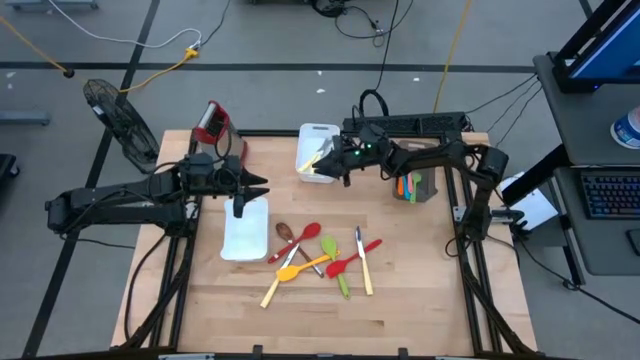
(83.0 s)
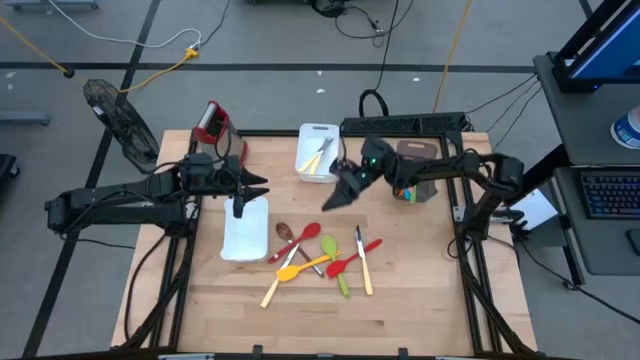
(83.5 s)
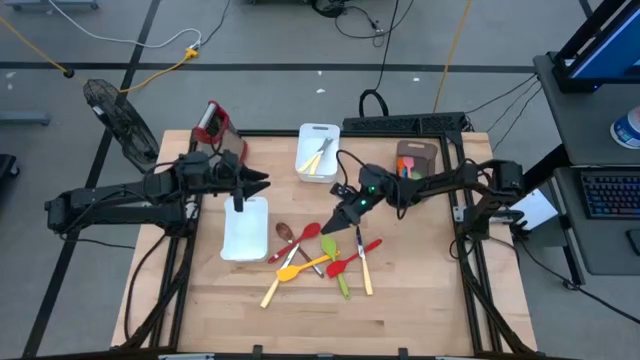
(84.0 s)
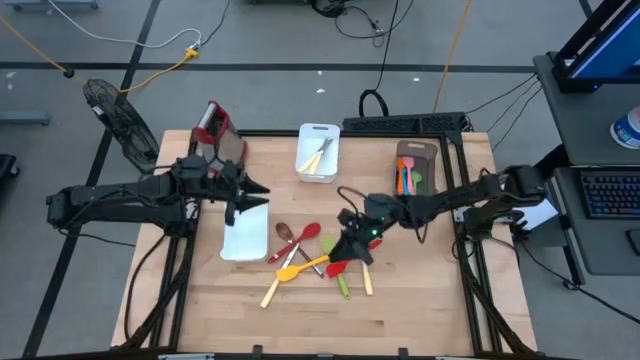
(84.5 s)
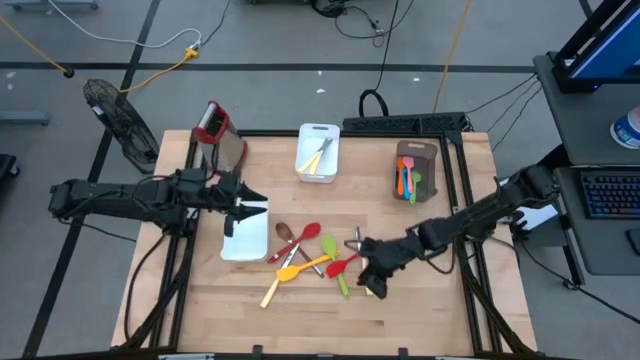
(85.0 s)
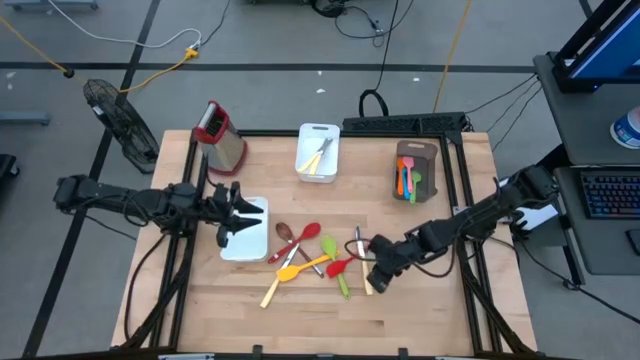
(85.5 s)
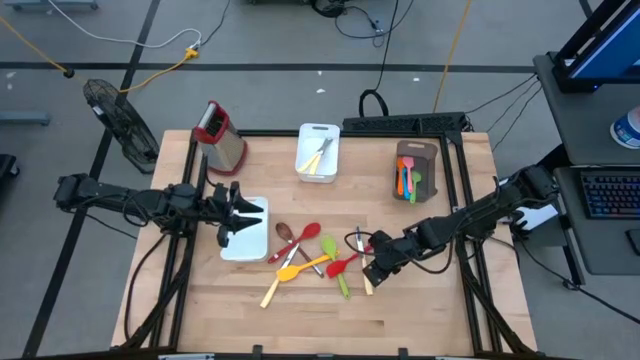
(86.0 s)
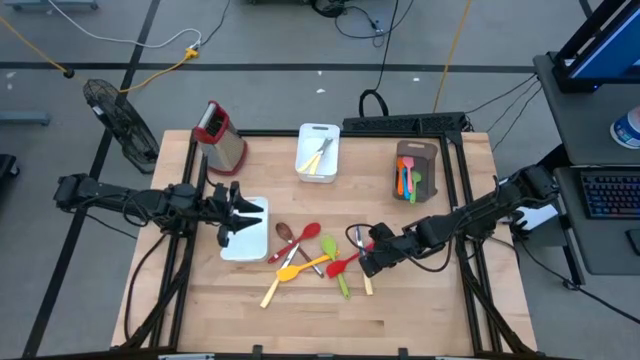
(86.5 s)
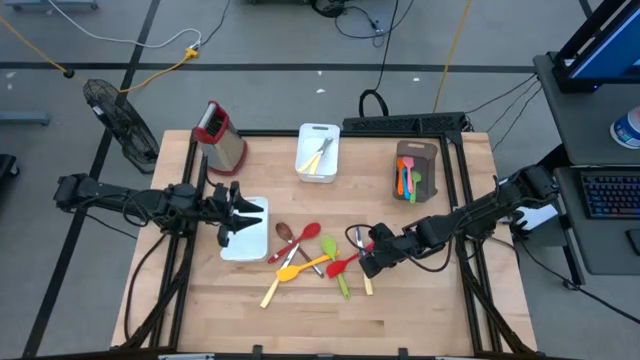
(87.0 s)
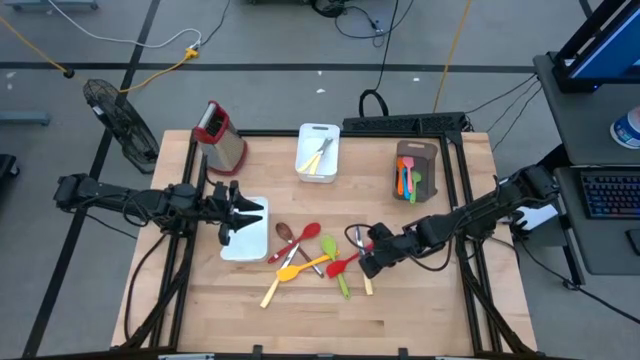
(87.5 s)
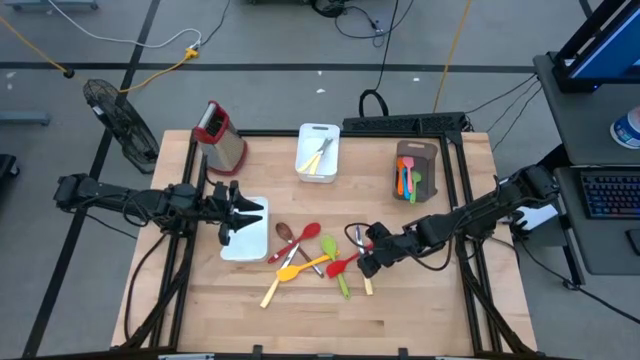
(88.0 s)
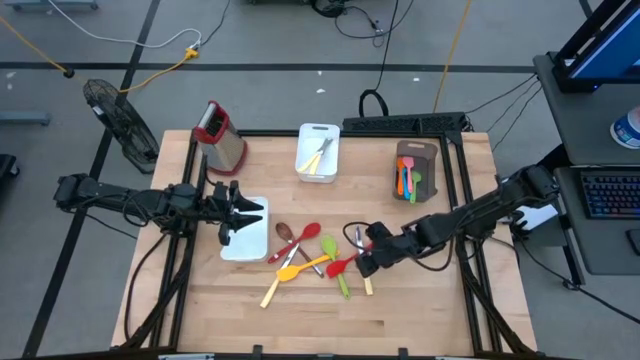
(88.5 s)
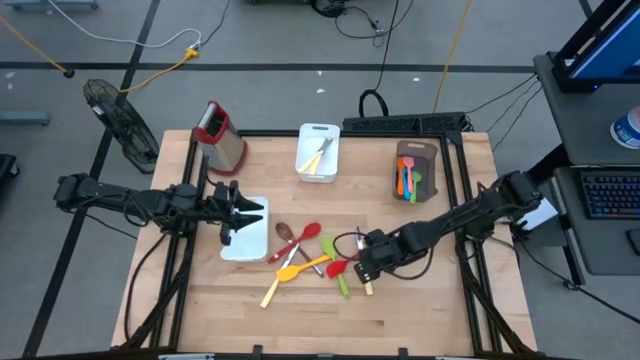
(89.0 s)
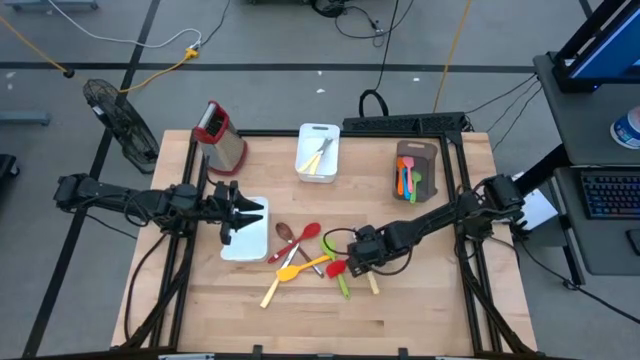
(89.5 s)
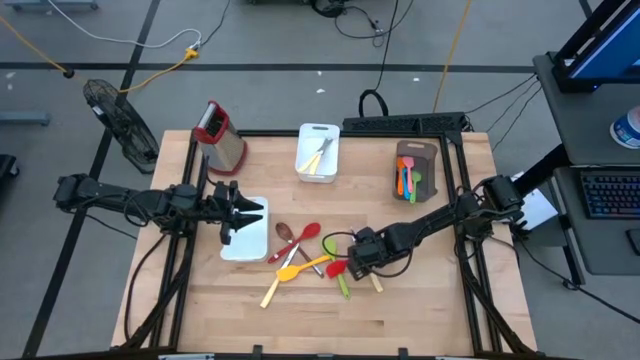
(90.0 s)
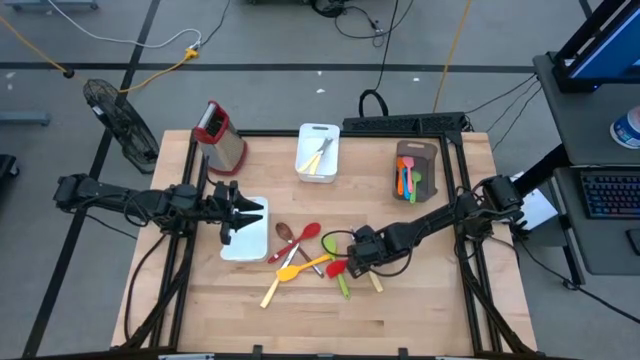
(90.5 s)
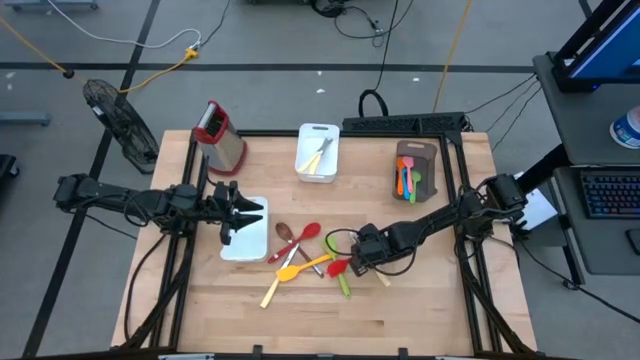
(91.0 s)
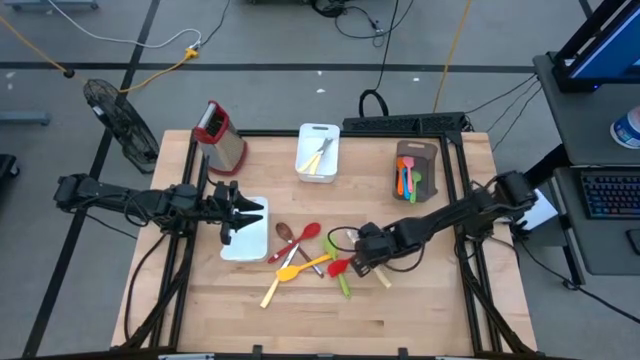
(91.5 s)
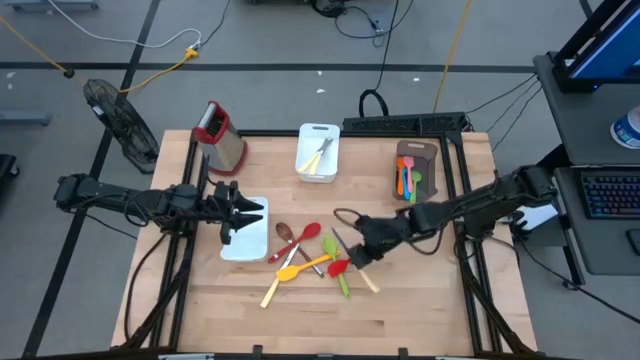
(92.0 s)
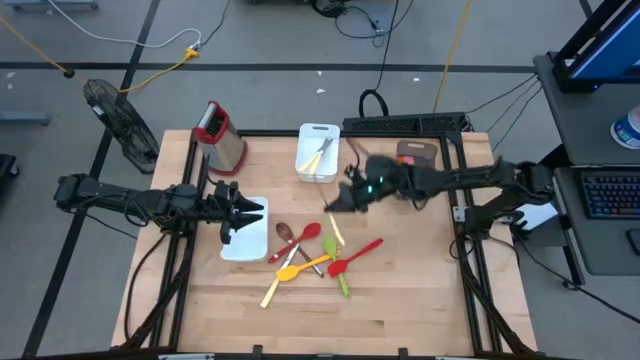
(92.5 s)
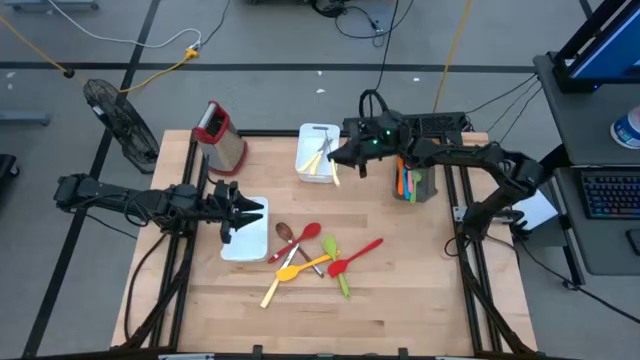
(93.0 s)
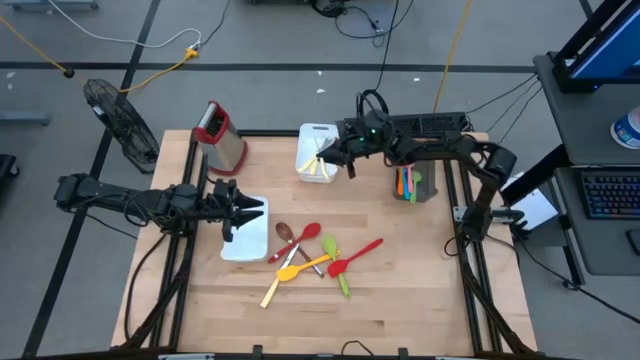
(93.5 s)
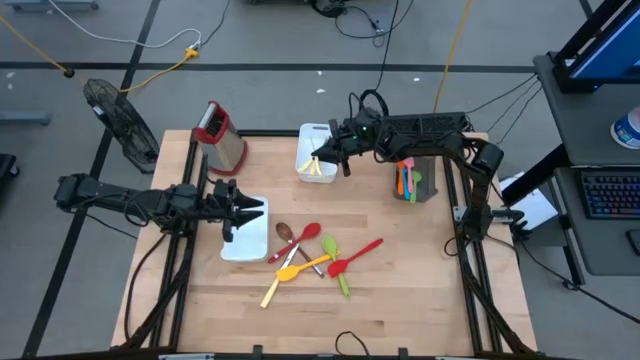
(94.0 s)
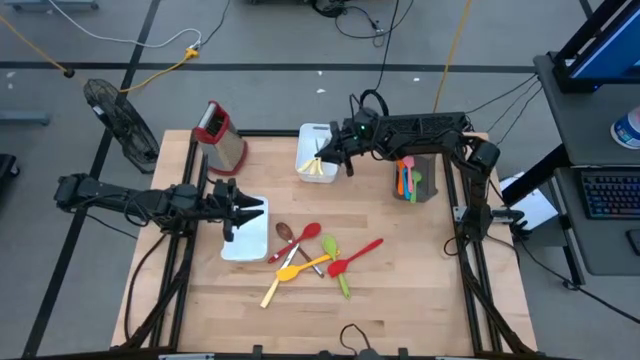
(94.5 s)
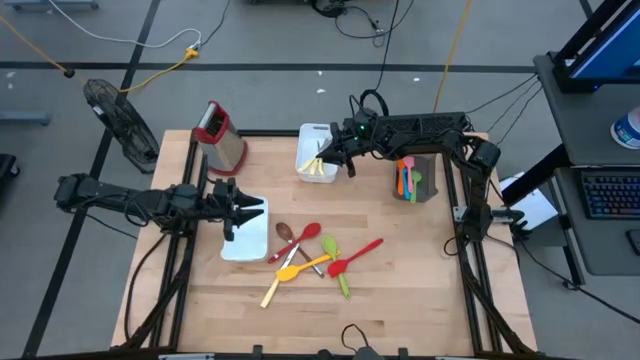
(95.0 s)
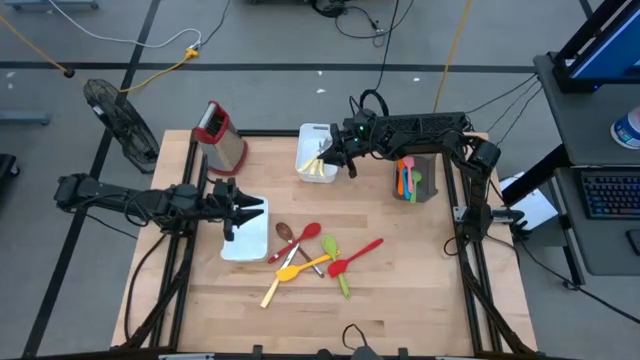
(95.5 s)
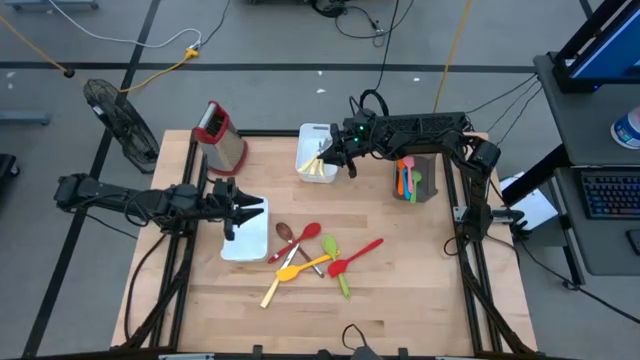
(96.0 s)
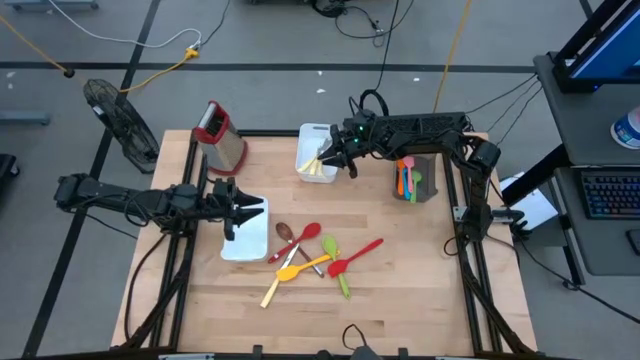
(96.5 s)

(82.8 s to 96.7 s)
Task: Pick & Place Kitchen Items
Put the yellow knife into the top white bin

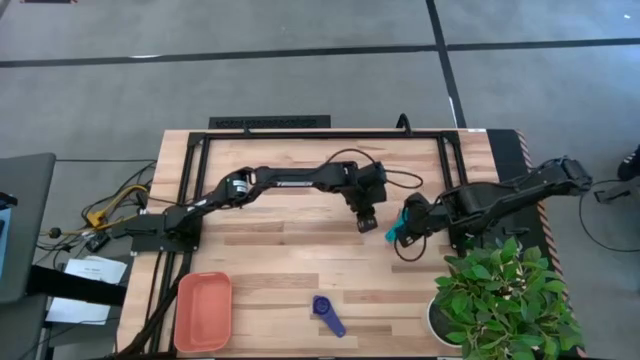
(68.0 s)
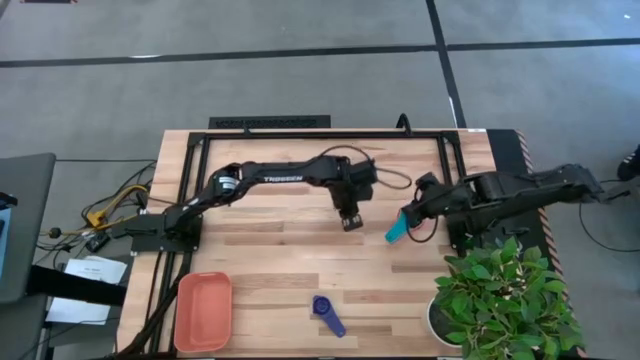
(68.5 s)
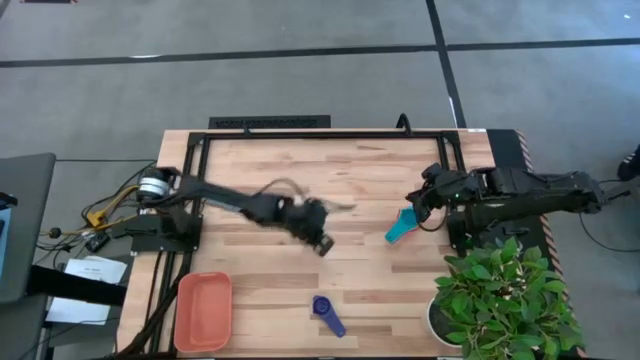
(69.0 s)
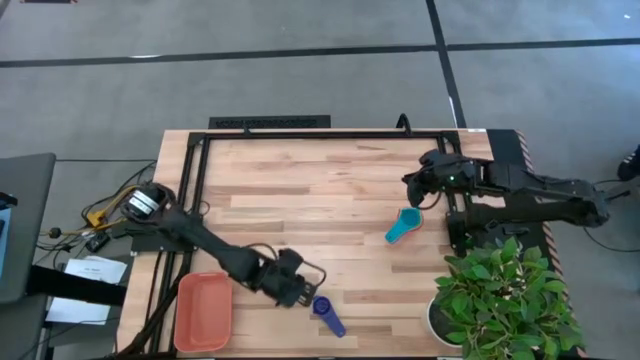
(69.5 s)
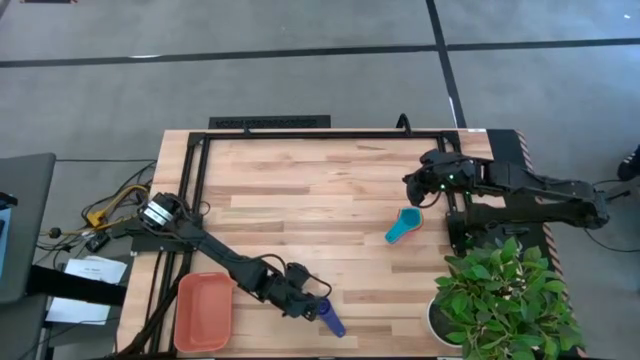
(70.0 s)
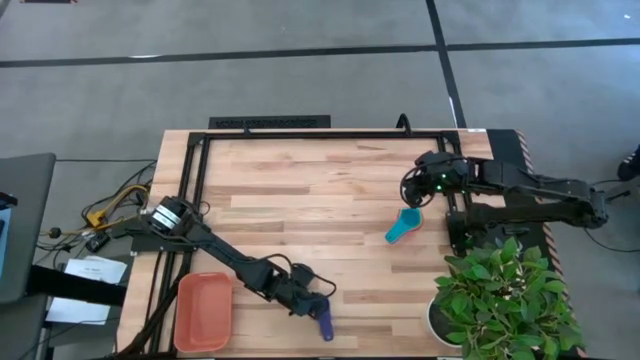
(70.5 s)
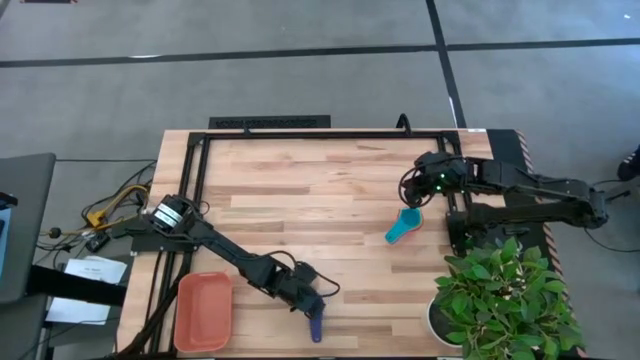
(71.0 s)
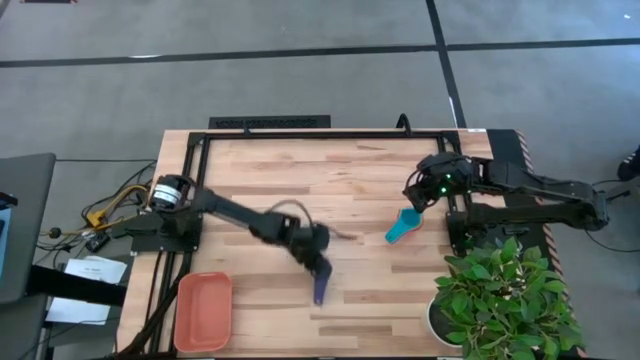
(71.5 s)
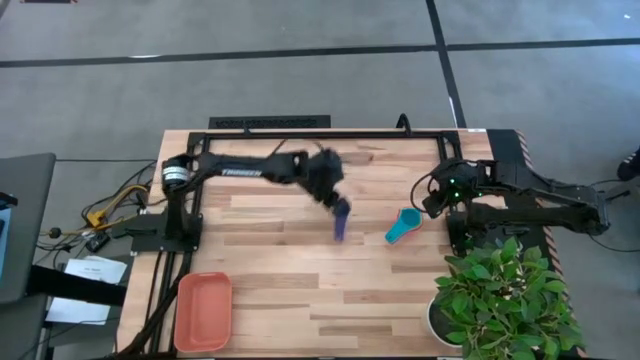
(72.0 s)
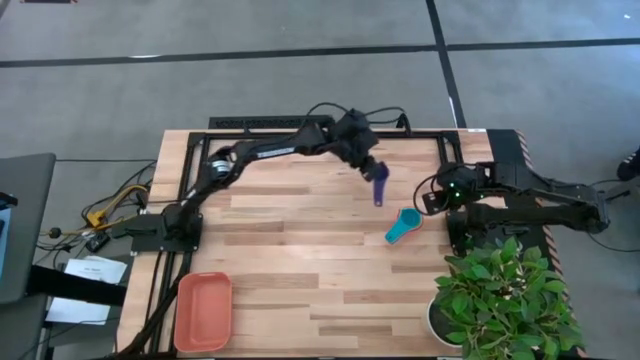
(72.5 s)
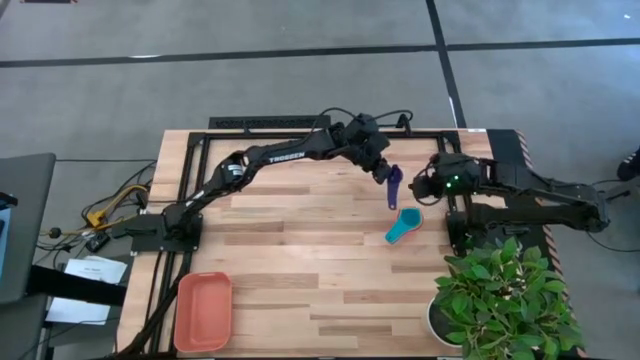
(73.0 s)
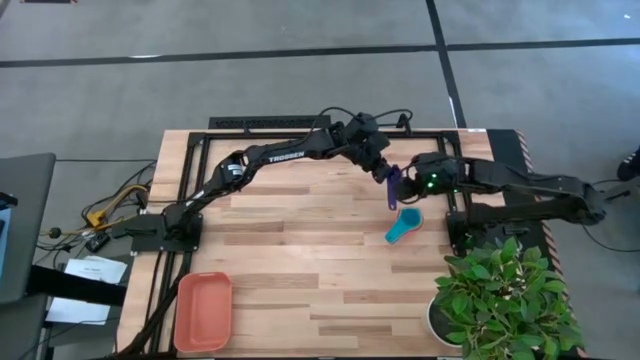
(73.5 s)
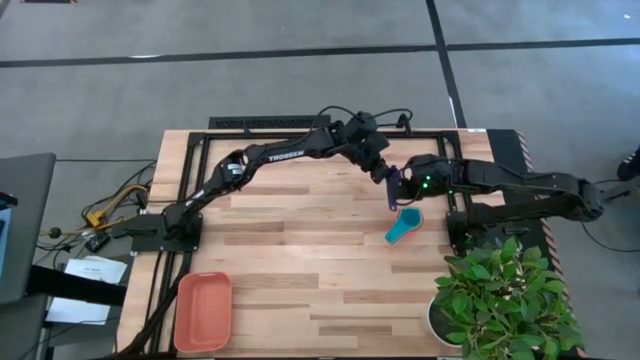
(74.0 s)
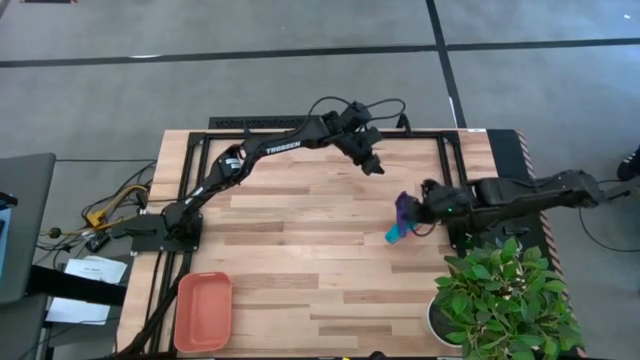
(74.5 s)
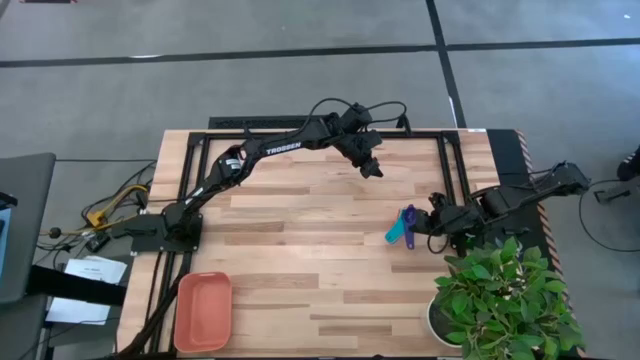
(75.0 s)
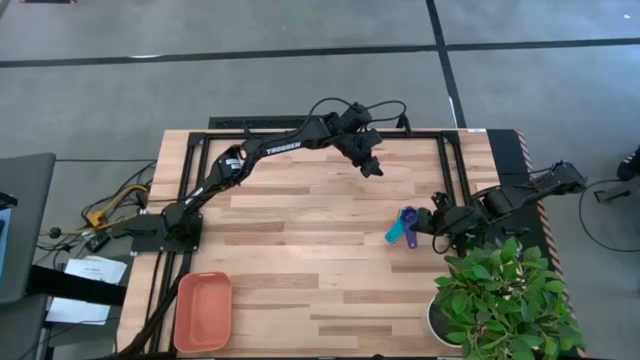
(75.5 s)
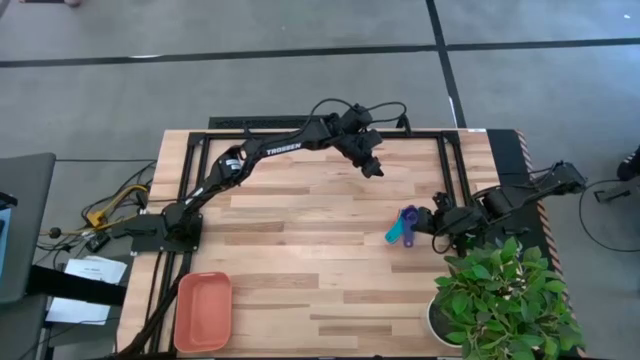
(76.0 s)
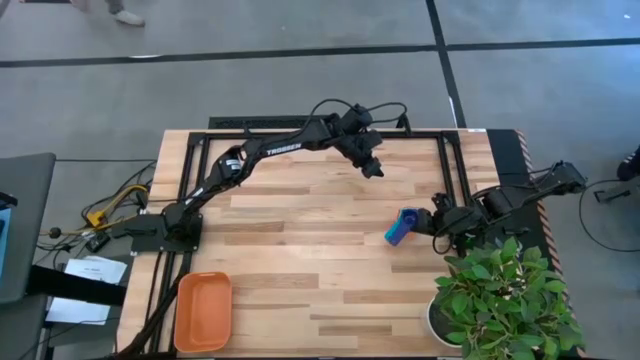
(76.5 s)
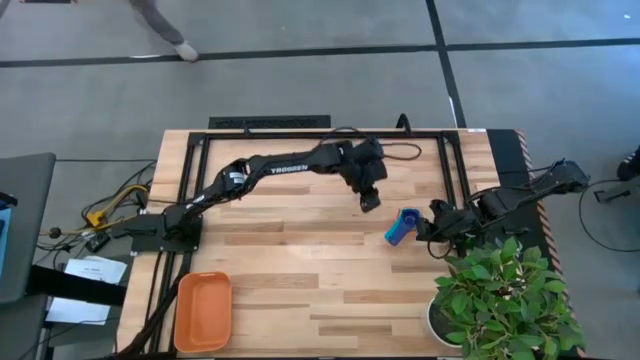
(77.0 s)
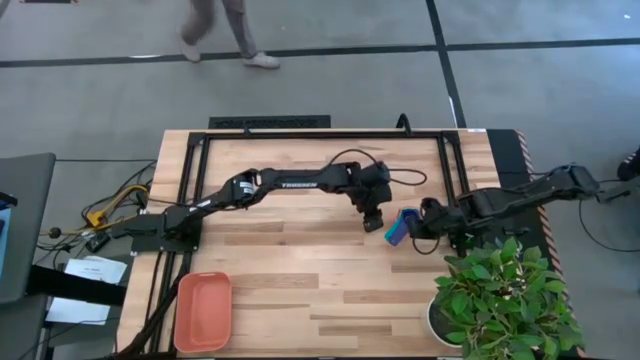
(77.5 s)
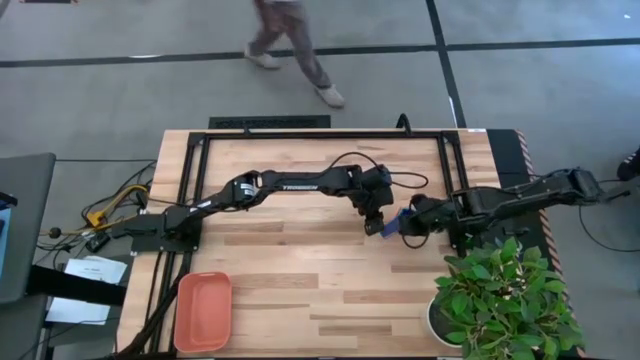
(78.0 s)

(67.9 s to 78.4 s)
Task: Nest measuring cups in basket
Stack the dark blue measuring cup on top of the light blue measuring cup
